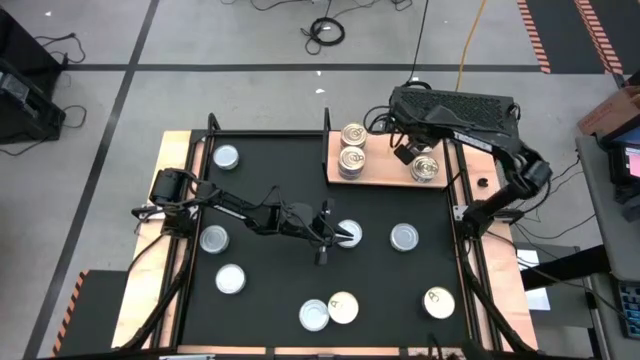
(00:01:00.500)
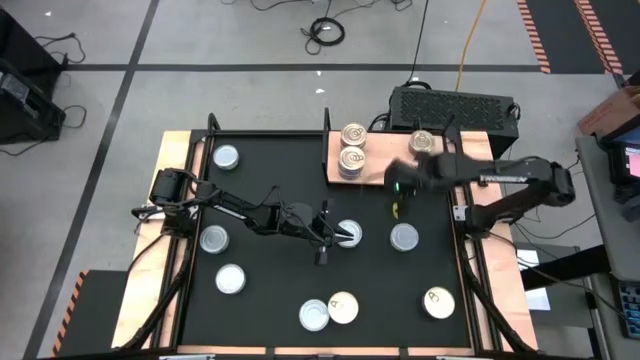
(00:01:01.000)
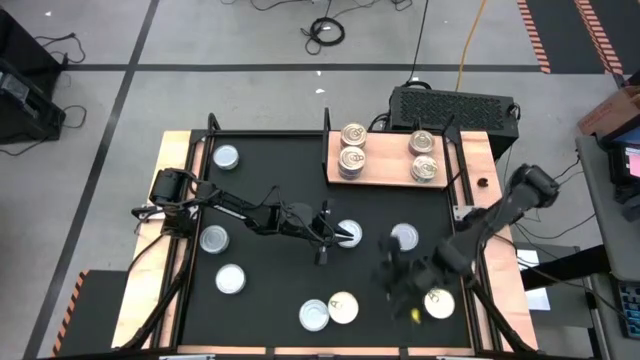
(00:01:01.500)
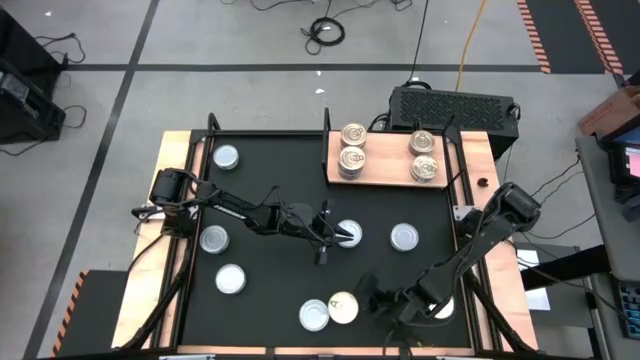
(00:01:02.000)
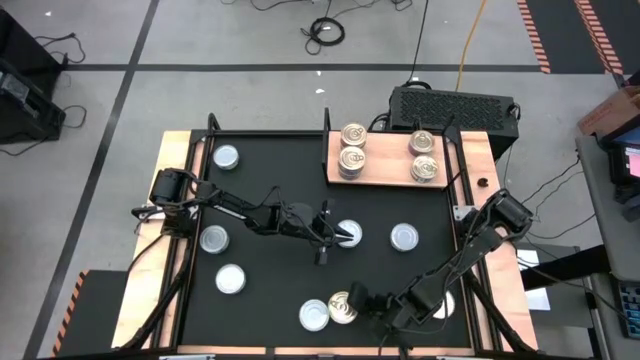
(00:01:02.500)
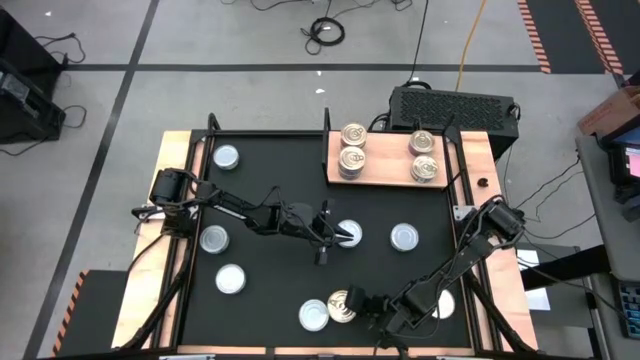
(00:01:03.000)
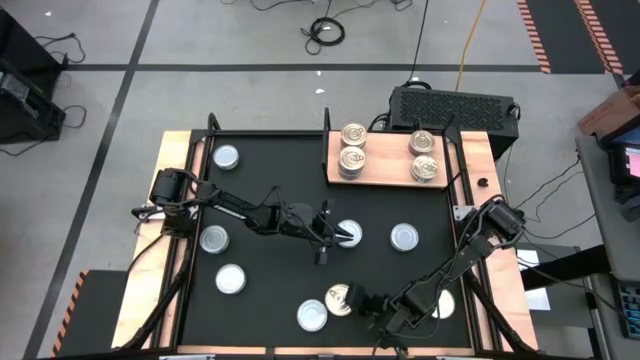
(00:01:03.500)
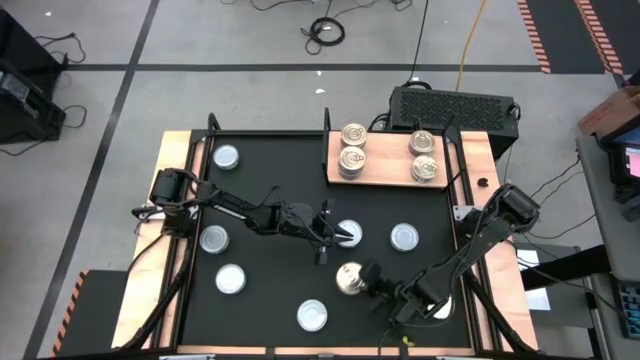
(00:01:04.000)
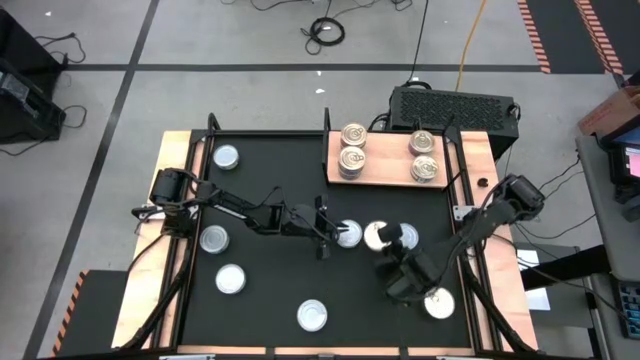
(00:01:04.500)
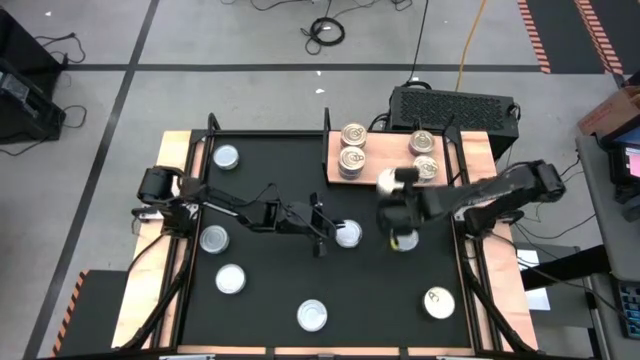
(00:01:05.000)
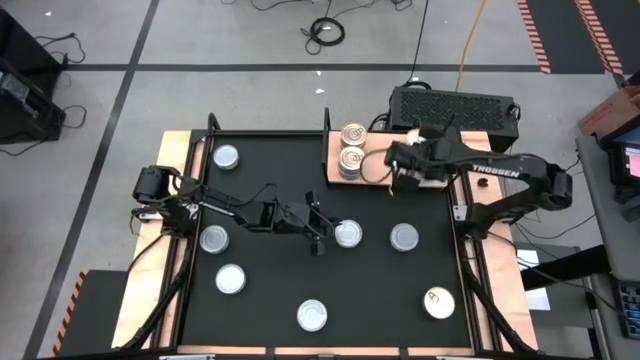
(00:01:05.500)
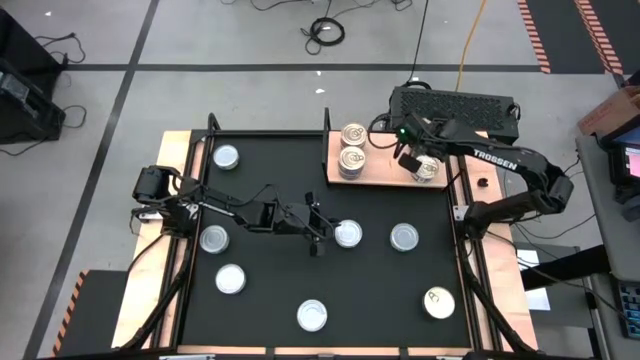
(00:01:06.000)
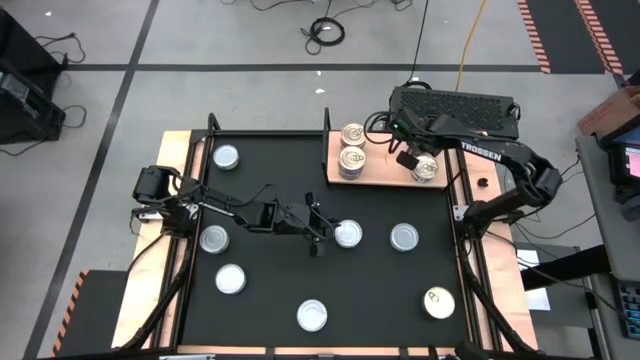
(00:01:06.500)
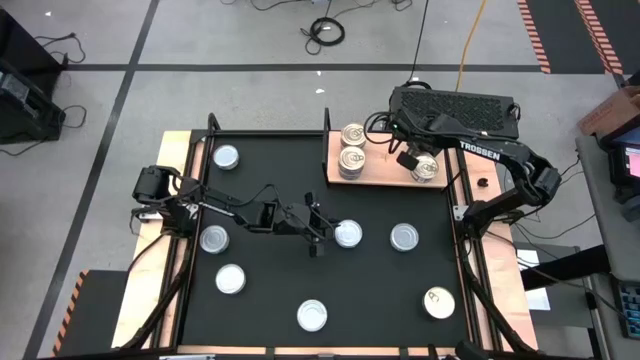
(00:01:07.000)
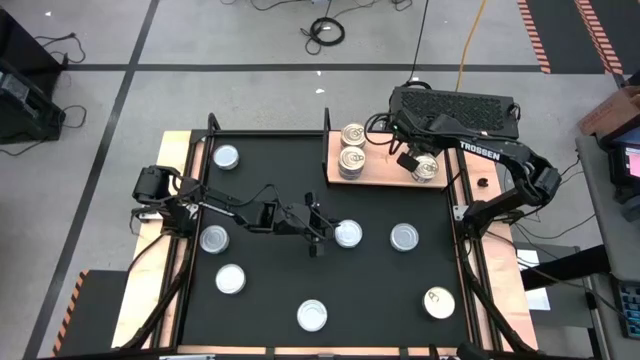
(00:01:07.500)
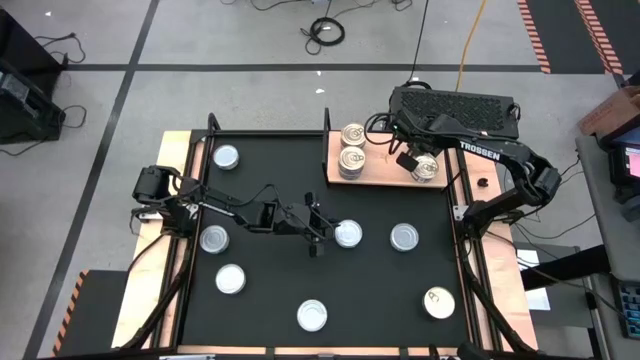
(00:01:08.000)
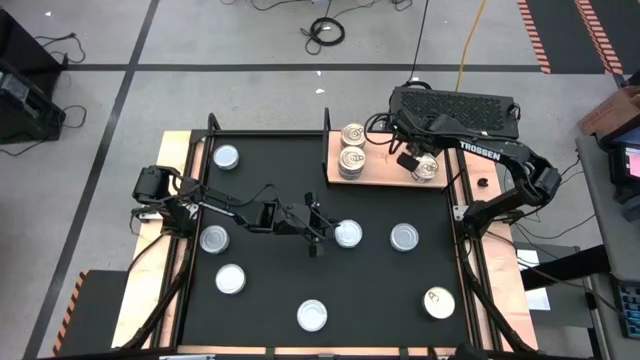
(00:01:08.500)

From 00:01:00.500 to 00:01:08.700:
Task: Stack canned seafood by type on shelf
Stack the blue-pink tuna can on top of the top right blue-pink tuna can on the shelf

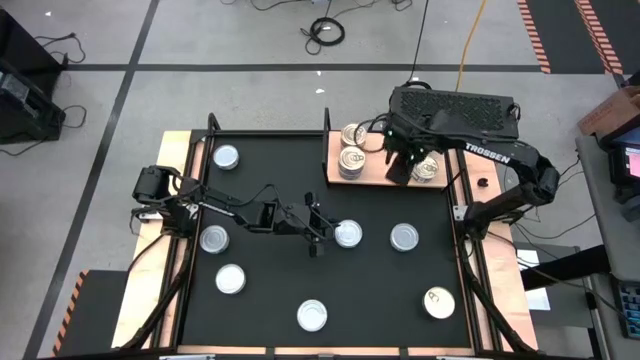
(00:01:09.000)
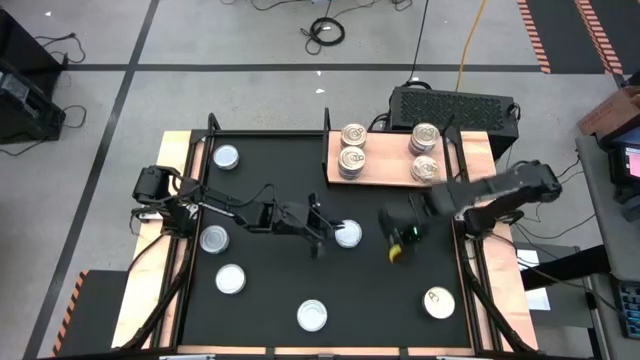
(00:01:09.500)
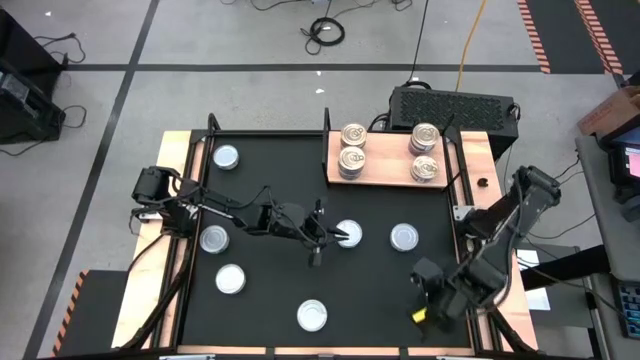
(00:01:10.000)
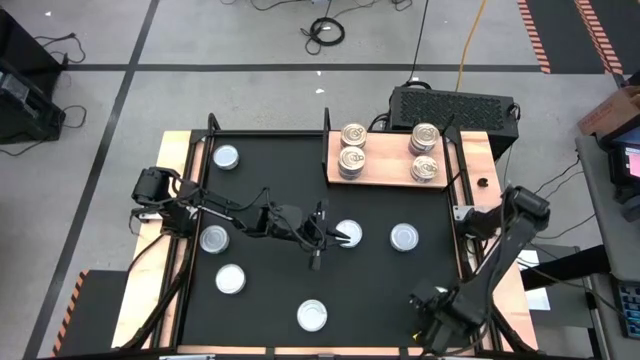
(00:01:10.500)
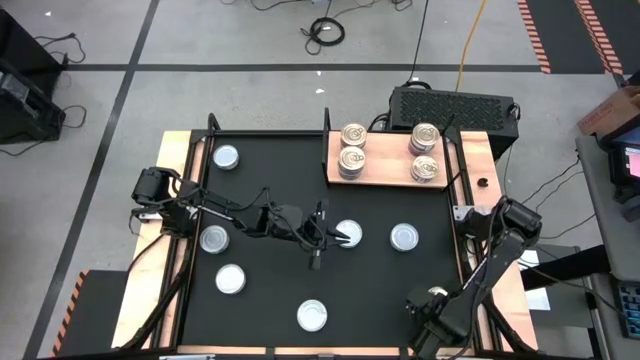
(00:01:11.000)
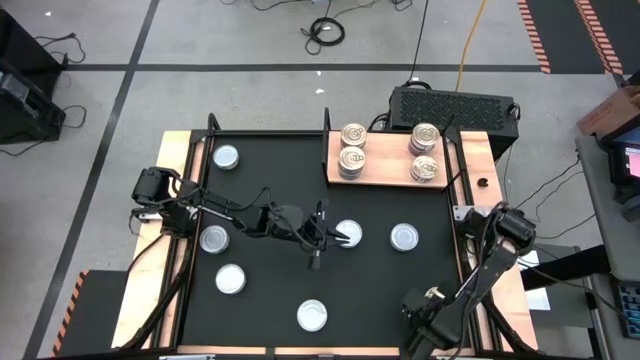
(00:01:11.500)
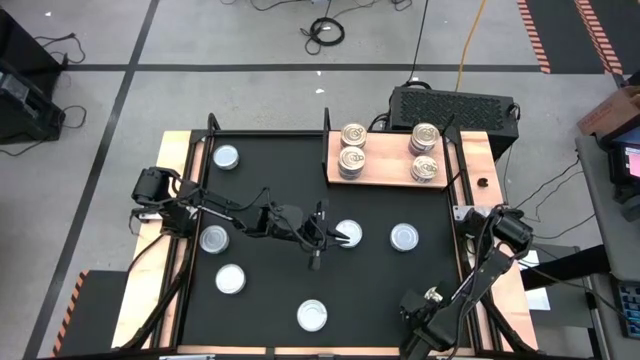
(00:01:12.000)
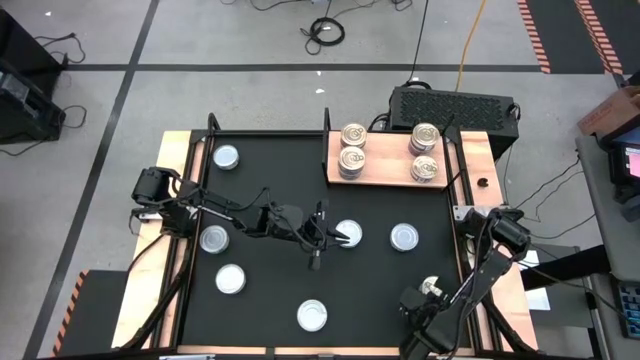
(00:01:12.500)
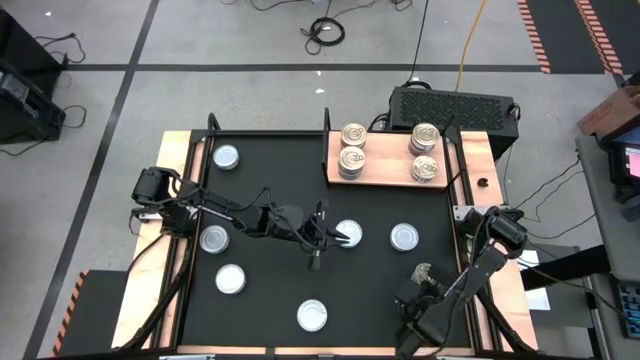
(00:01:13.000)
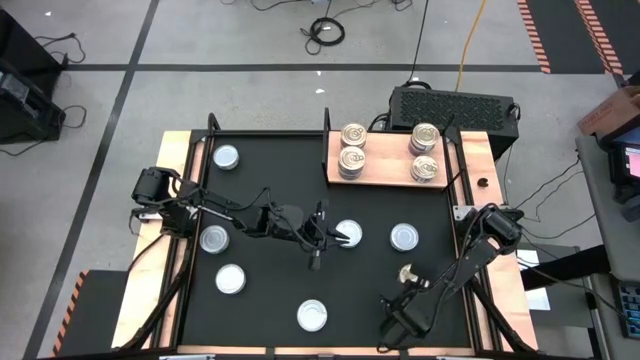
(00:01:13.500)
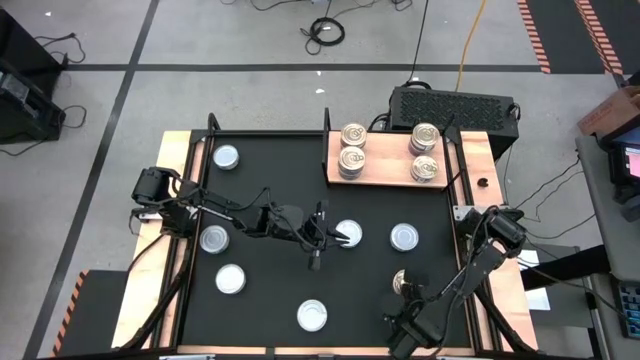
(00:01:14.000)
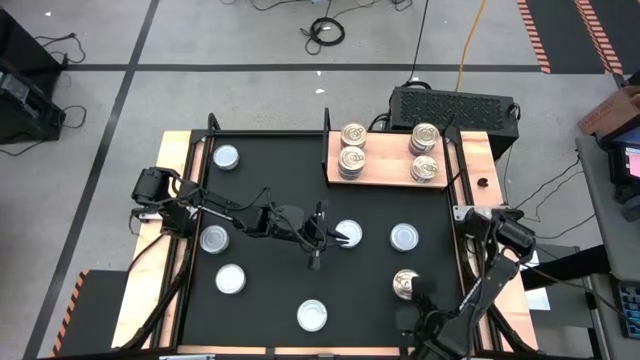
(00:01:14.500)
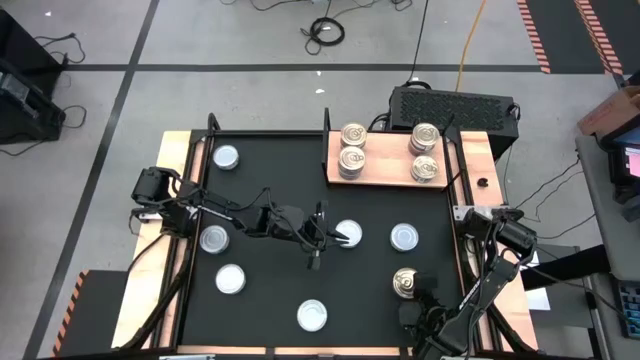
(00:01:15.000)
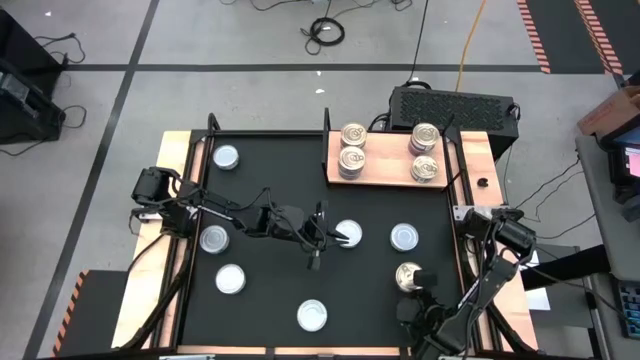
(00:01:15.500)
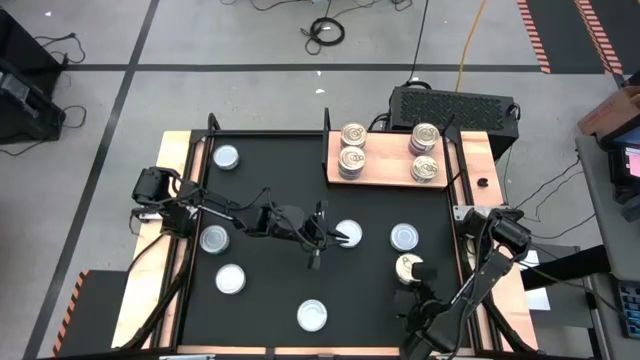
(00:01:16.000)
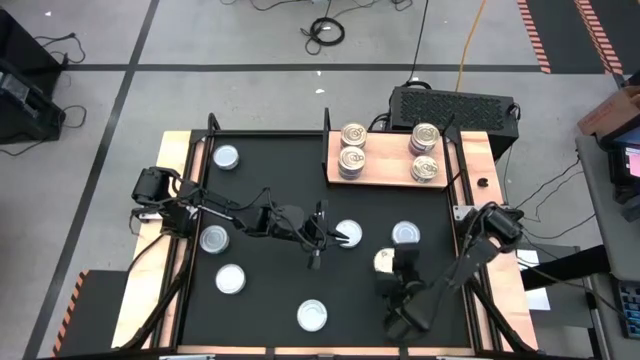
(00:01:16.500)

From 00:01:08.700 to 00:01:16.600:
Stack the blue-pink tuna can on top of the bottom right blue-pink tuna cans on the shelf

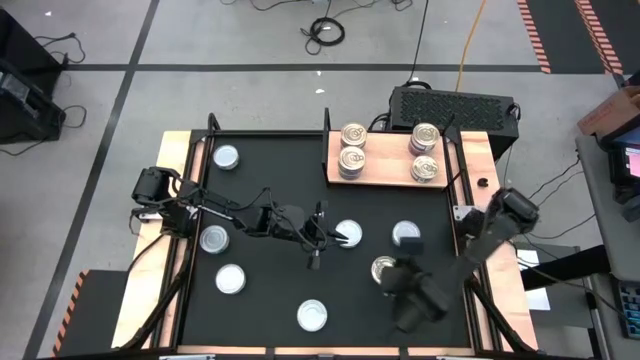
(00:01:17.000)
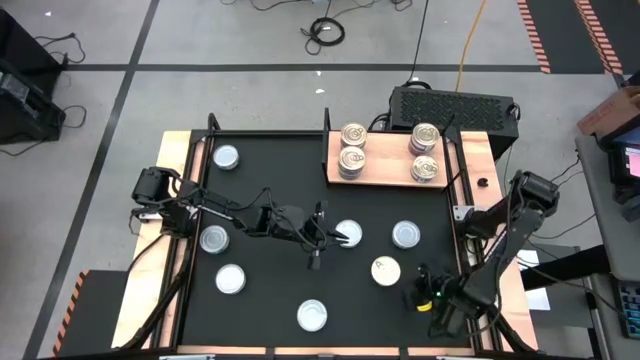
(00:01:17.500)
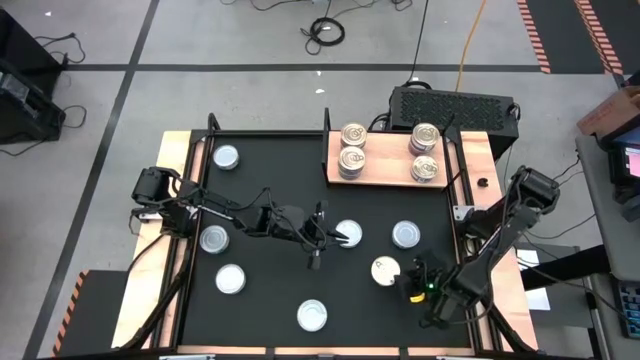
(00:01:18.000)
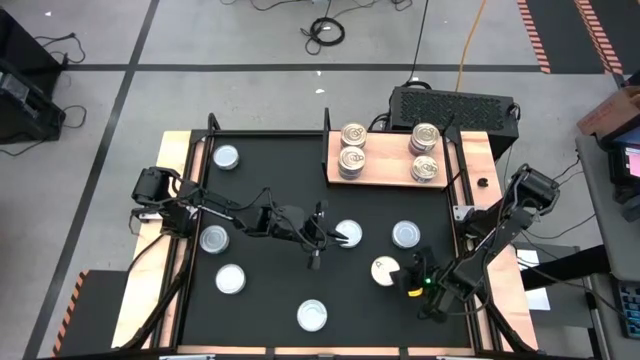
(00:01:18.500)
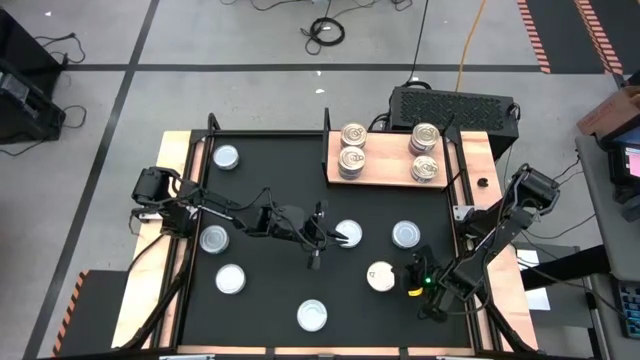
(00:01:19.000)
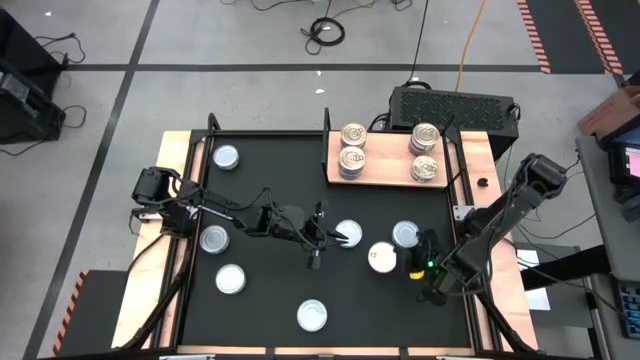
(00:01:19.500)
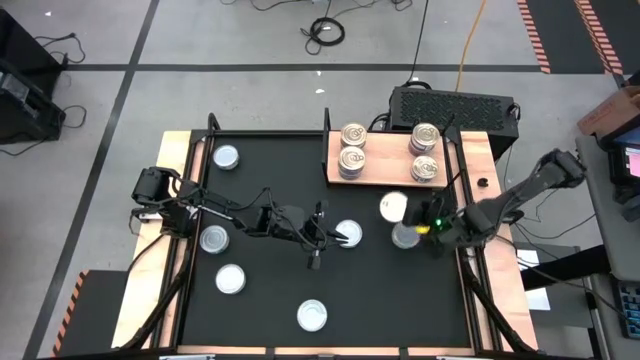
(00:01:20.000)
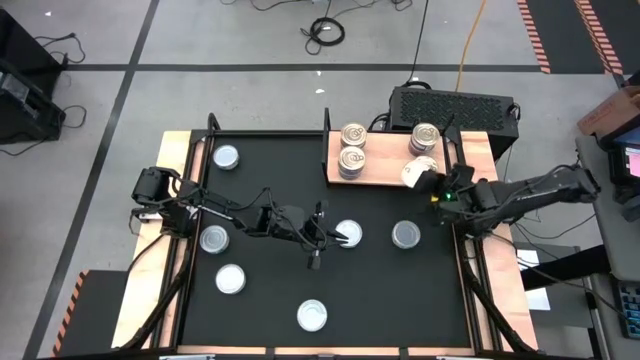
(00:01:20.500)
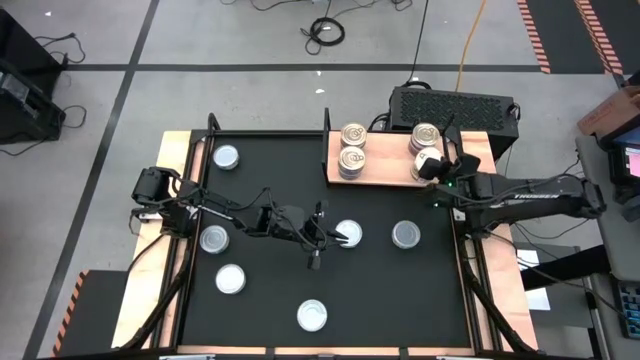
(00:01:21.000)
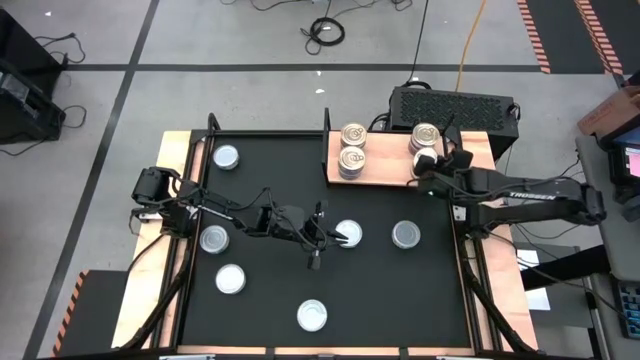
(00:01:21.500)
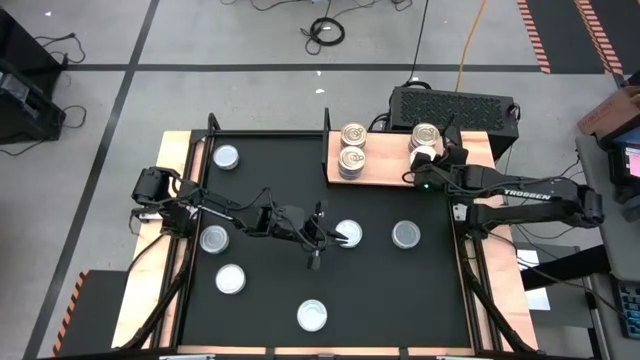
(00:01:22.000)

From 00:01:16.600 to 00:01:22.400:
Stack the blue-pink tuna can on top of the bottom right blue-pink tuna can on the shelf

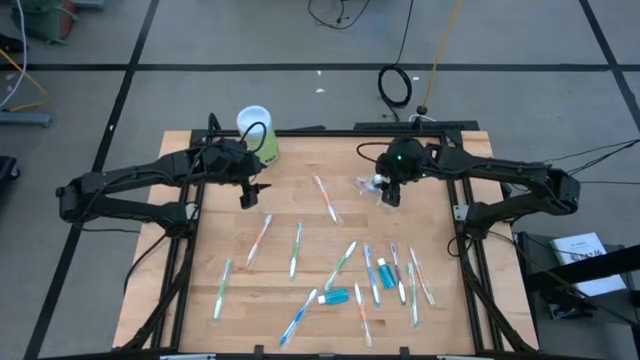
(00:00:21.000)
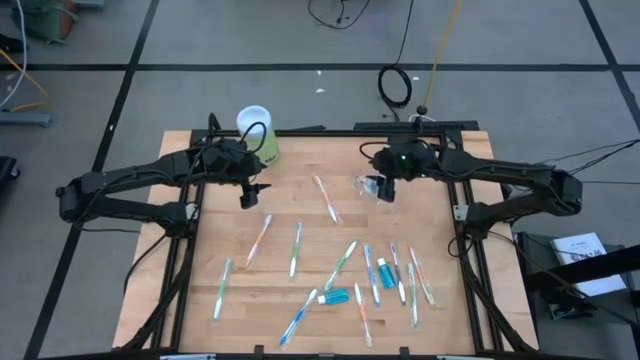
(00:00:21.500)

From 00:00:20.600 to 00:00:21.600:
Task: Pick & Place toothbrushing station
Adjust the violet toothbrush in the transparent organizer
